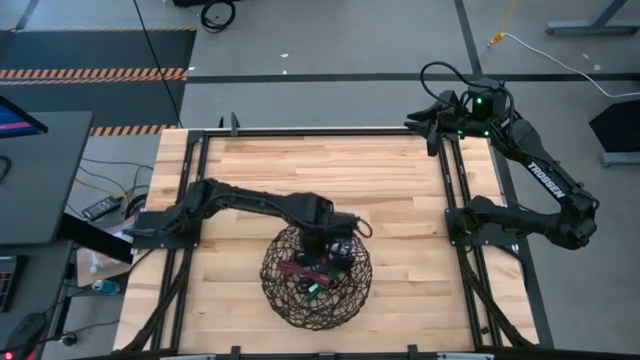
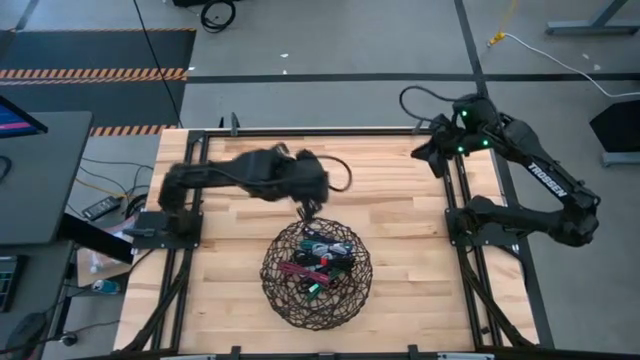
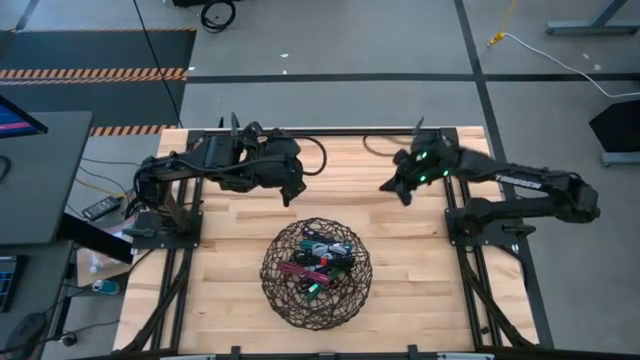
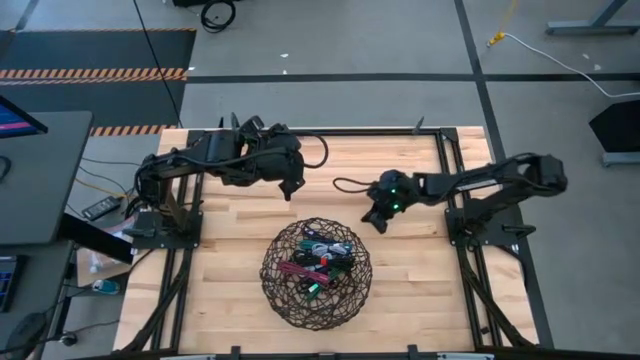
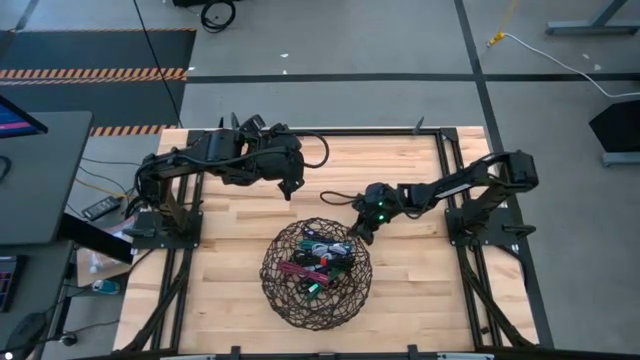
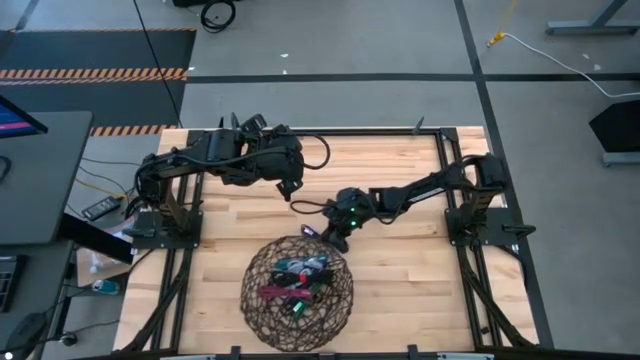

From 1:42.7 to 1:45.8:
Task: Pick and place USB-C Cables
Adjust the wire basket

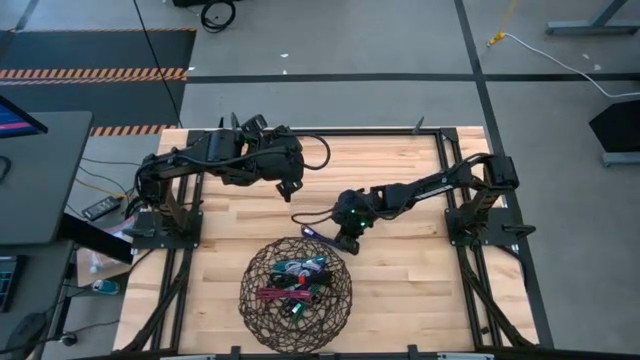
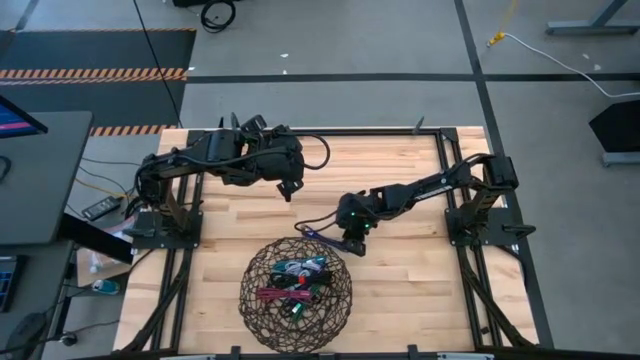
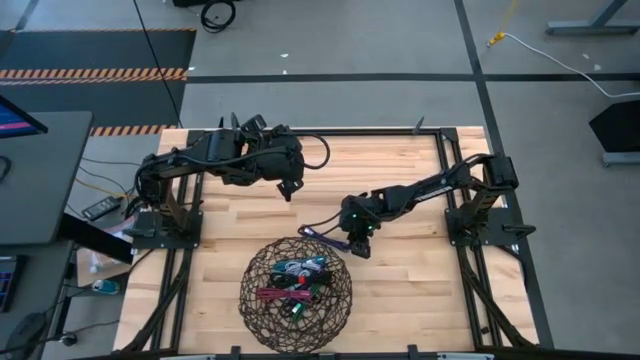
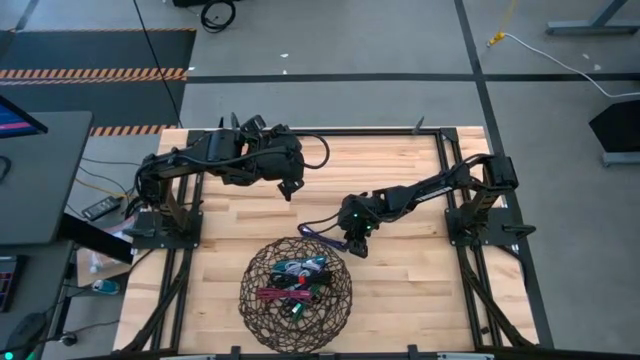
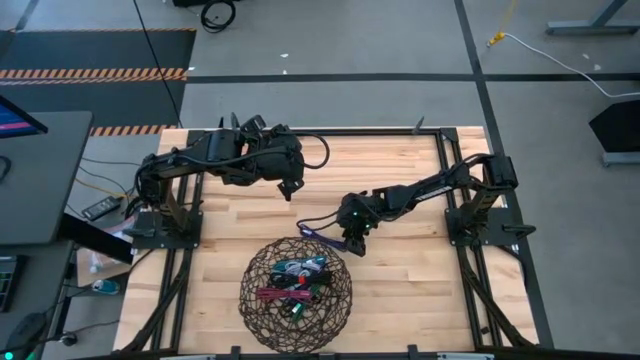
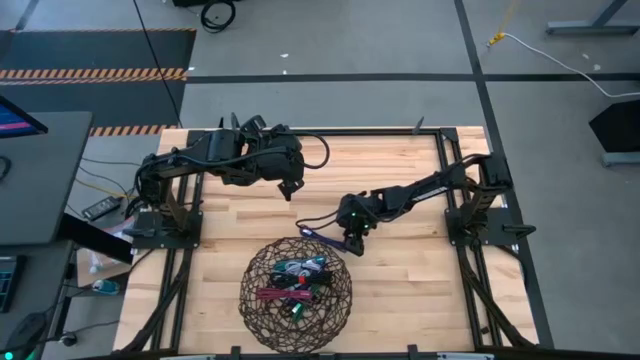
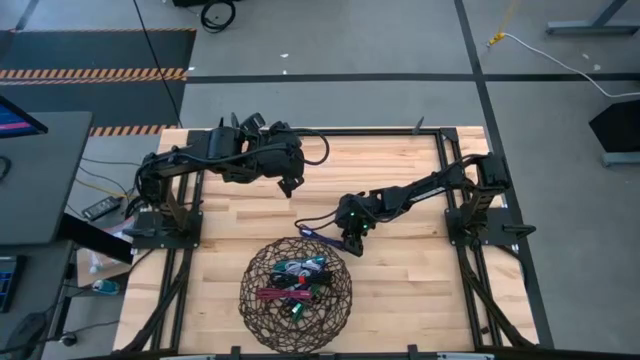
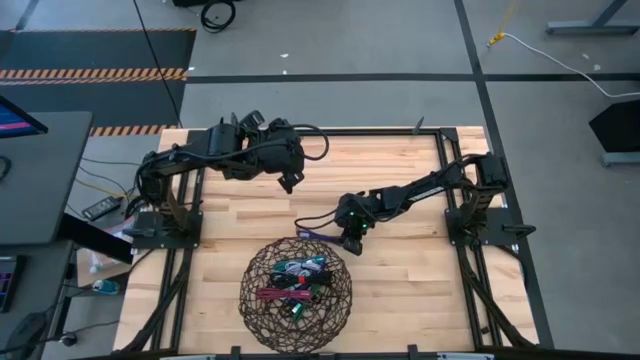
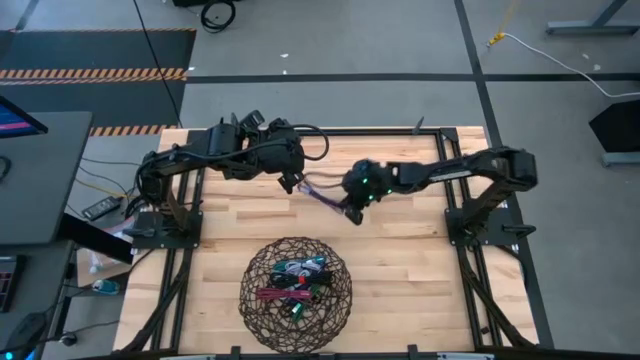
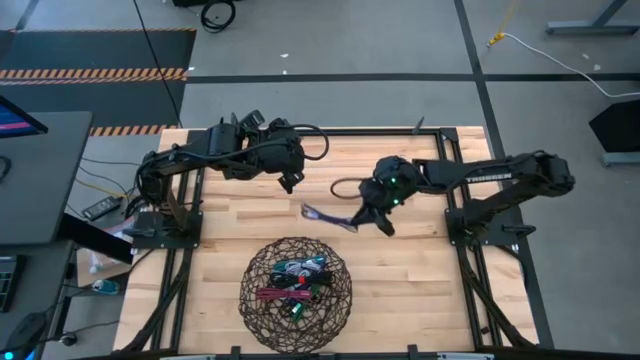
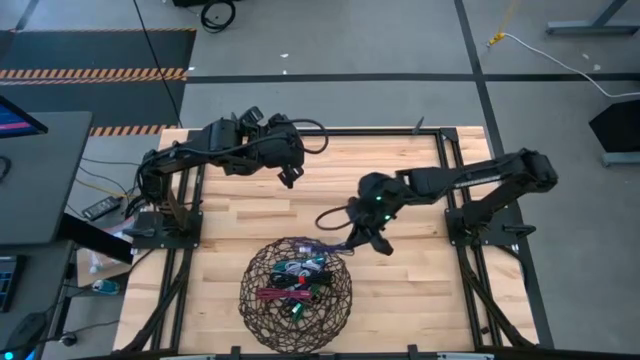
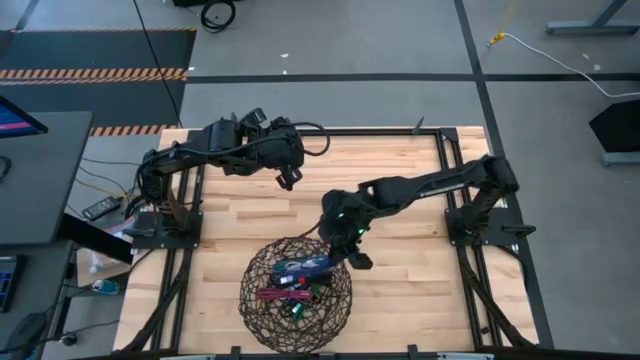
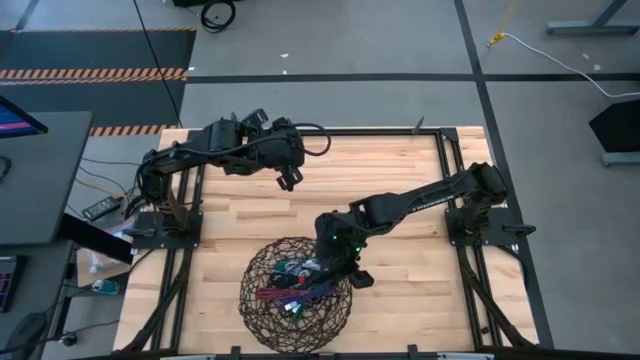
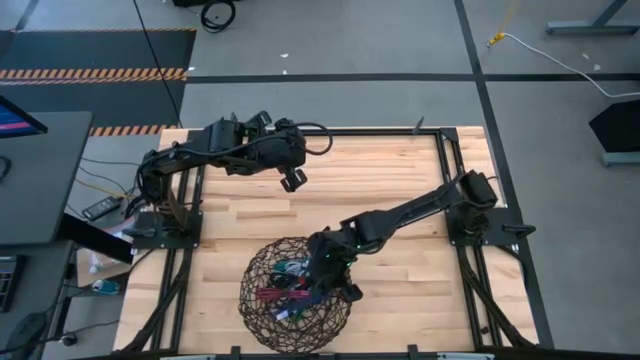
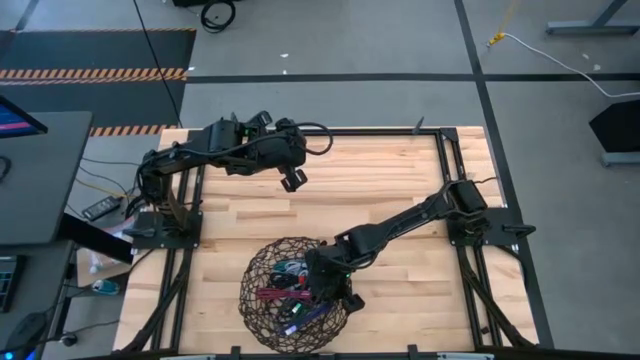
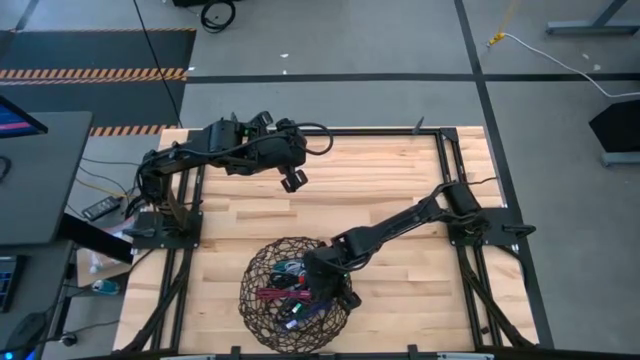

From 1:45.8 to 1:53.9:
Put the violet charger cable into the wire basket

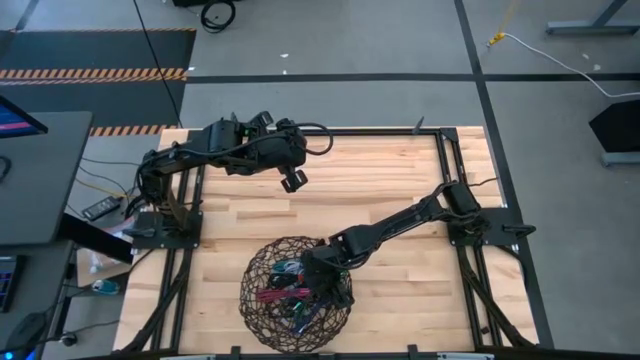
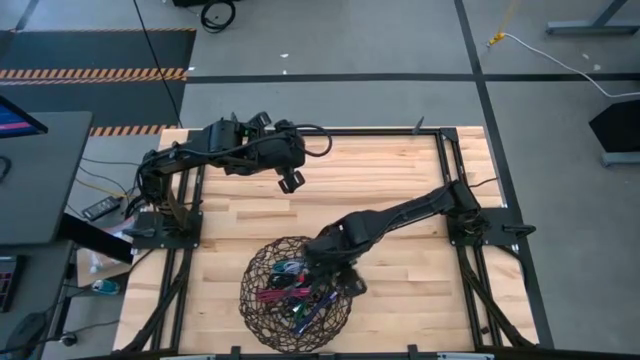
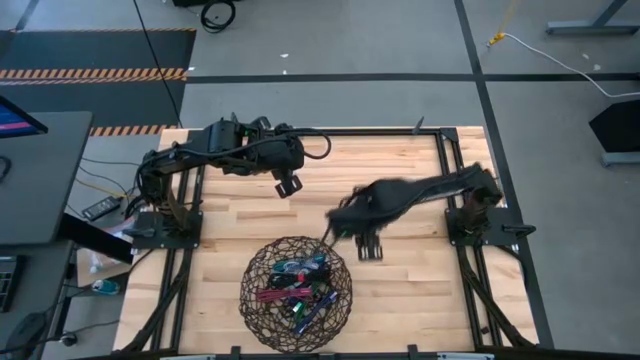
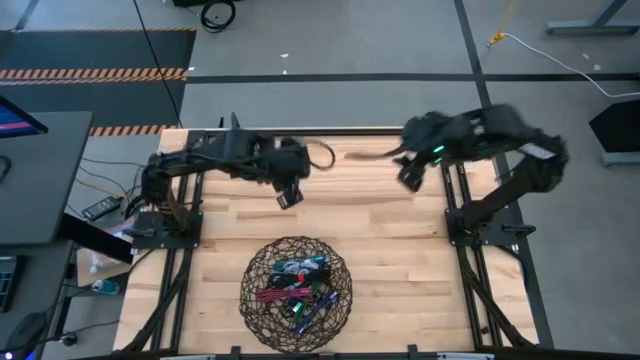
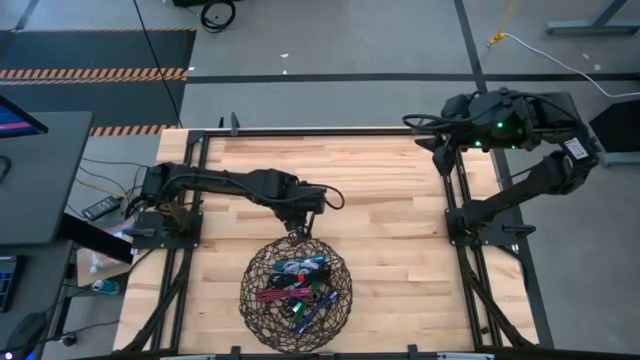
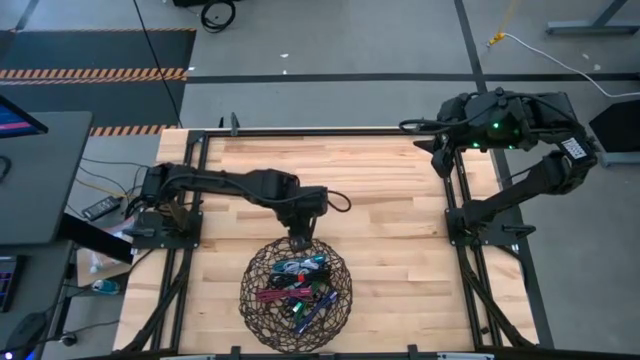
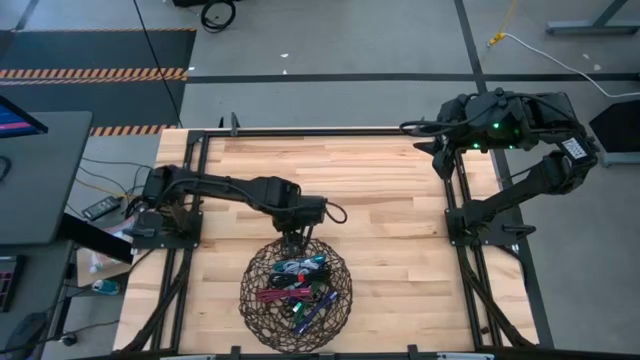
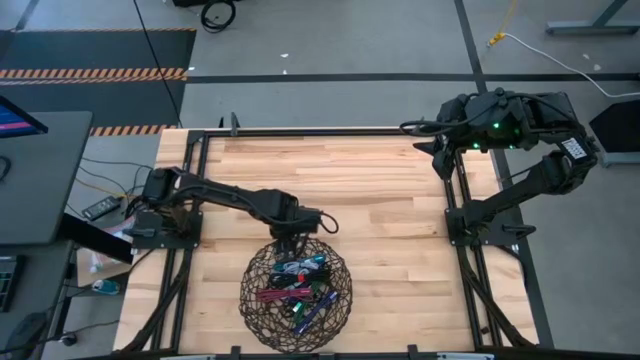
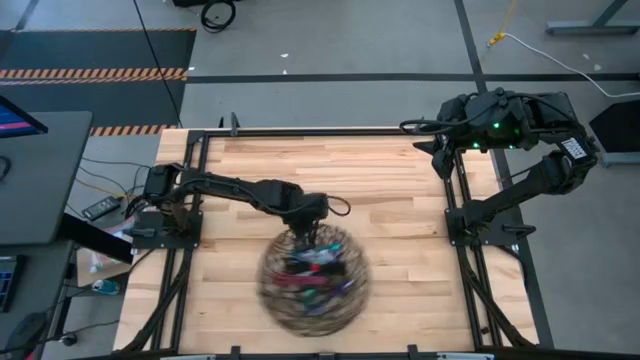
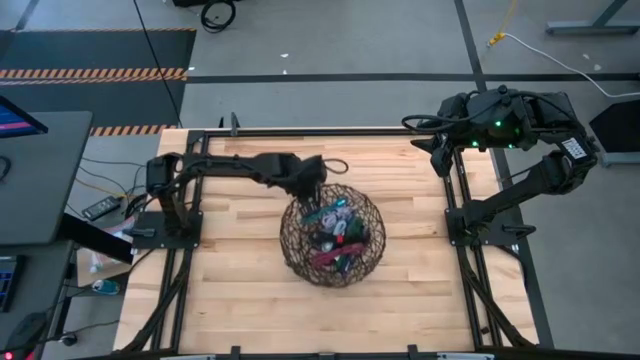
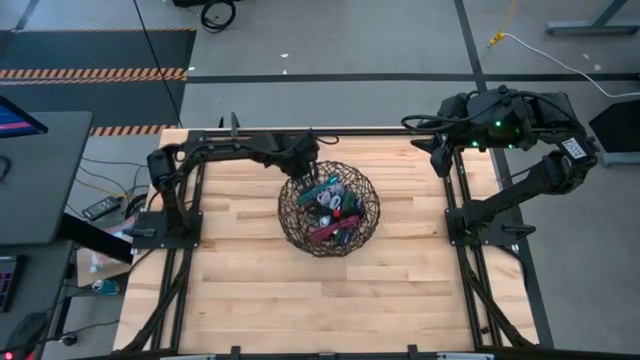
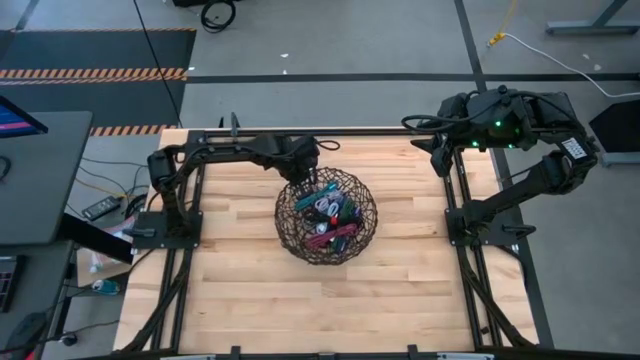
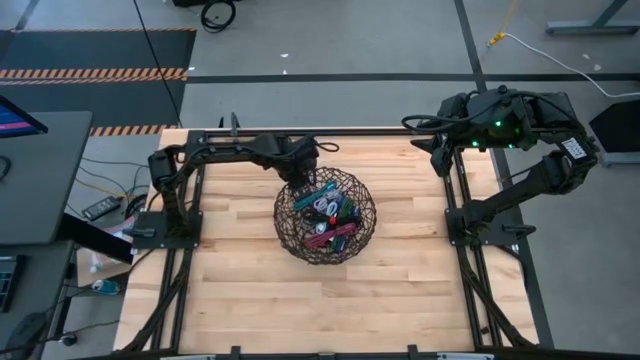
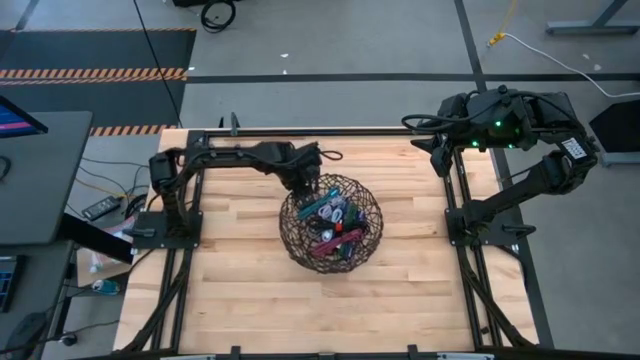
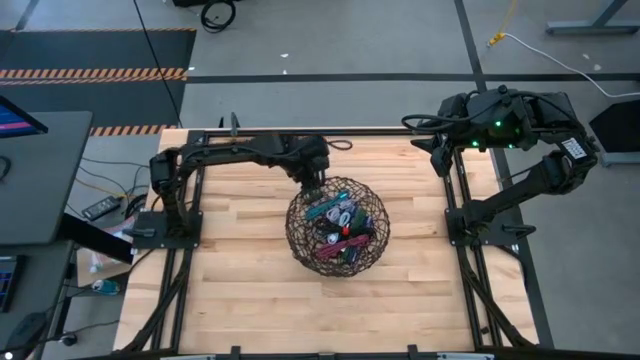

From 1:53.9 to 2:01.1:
Move the wire basket to the center of the table

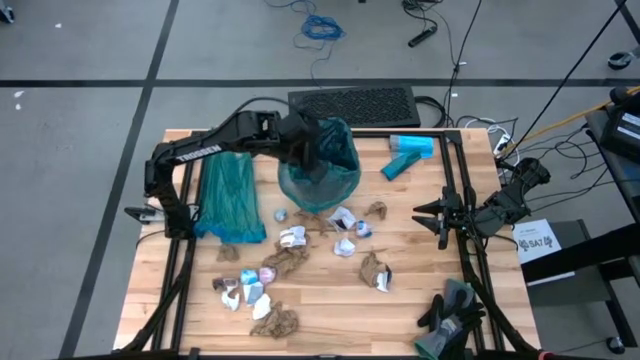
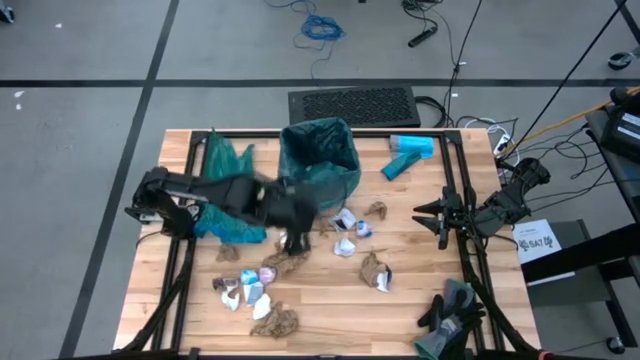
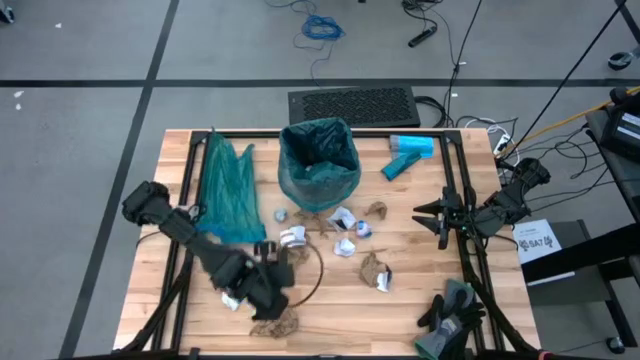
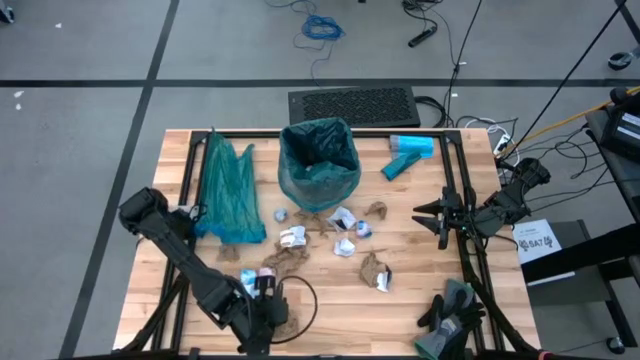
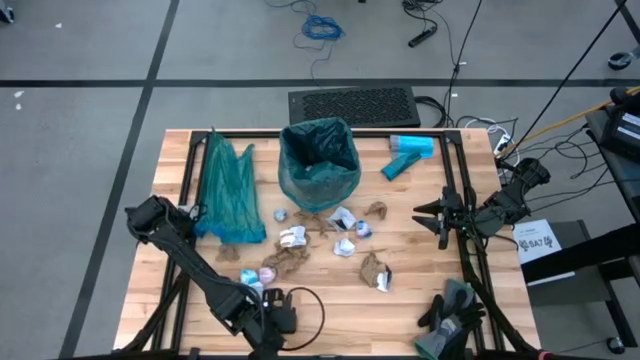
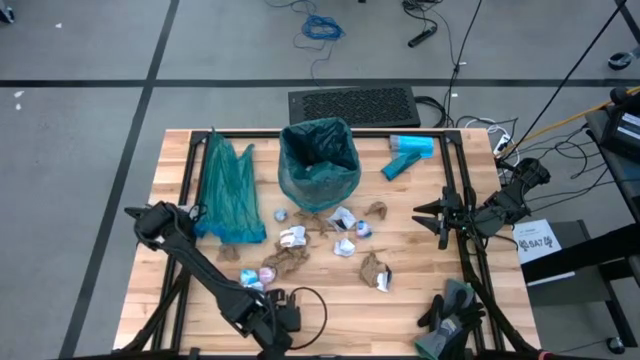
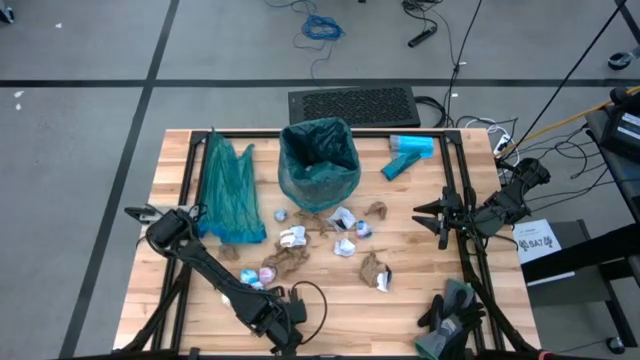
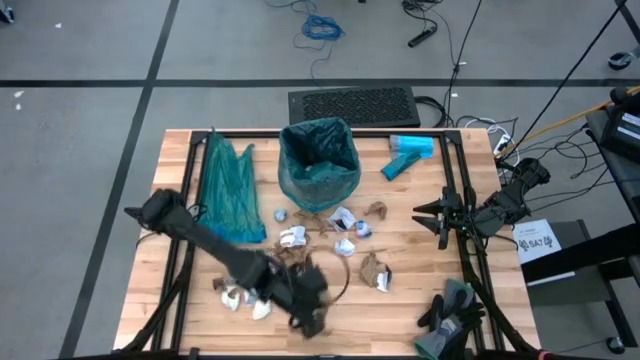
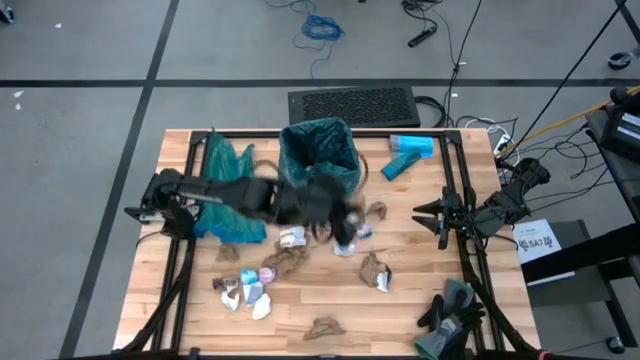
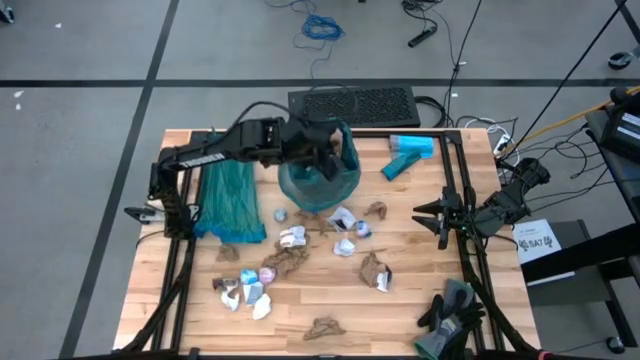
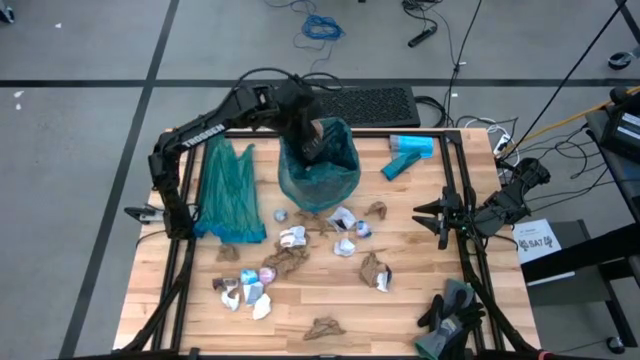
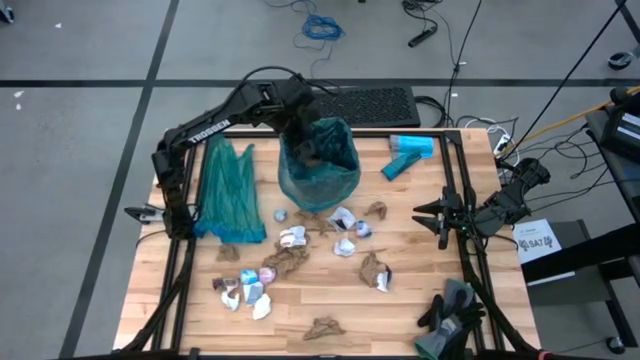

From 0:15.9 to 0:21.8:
Task: place trash/remove bag and relplace
Put the brown napkin into the blue trash bag inside the black trash bin
